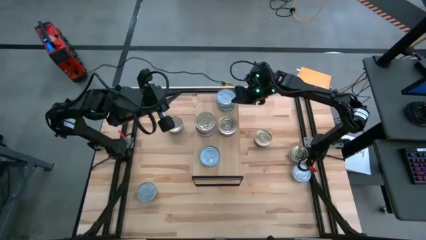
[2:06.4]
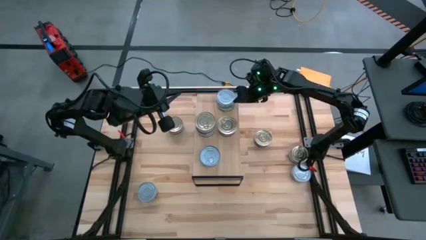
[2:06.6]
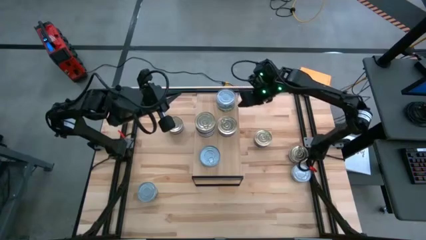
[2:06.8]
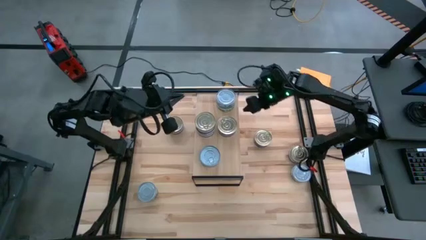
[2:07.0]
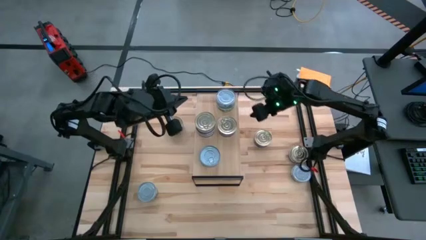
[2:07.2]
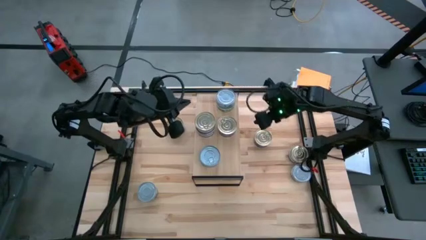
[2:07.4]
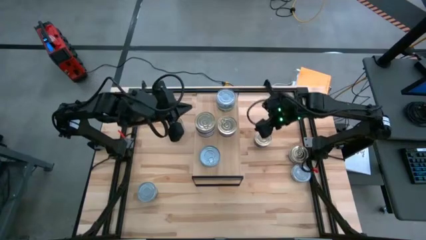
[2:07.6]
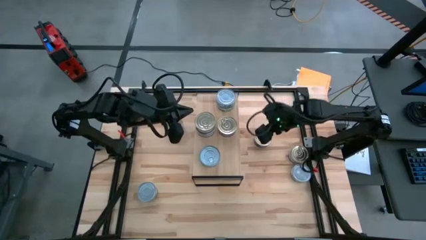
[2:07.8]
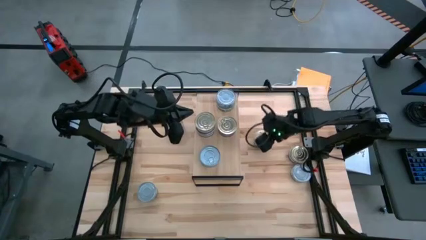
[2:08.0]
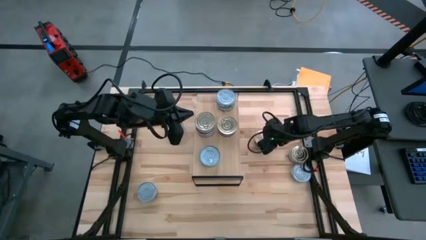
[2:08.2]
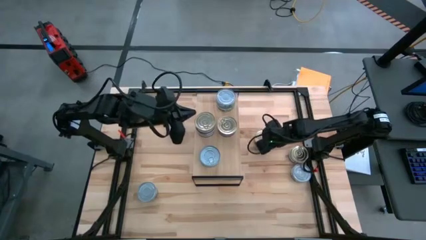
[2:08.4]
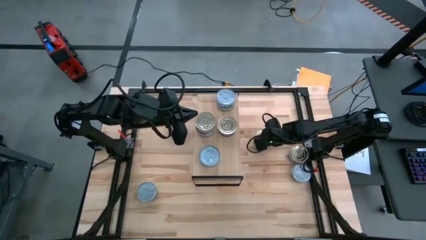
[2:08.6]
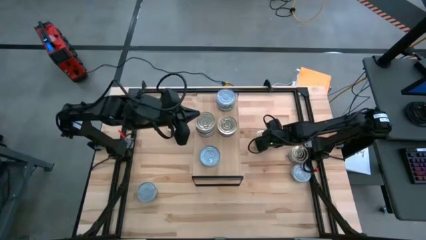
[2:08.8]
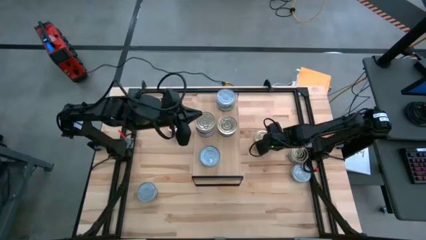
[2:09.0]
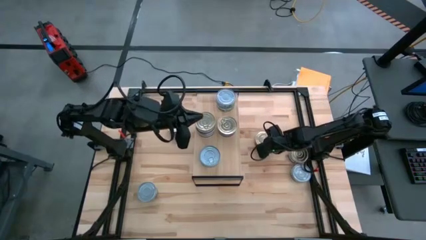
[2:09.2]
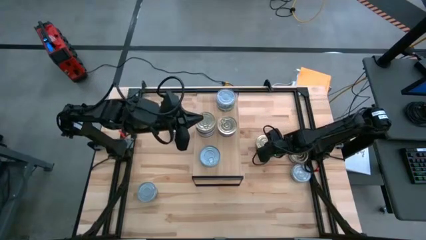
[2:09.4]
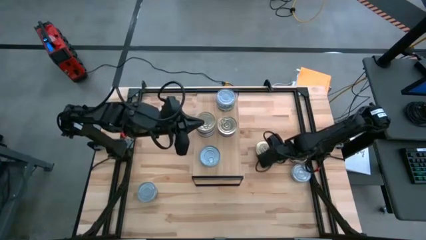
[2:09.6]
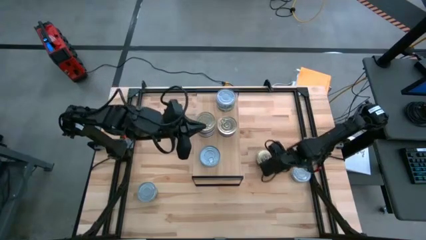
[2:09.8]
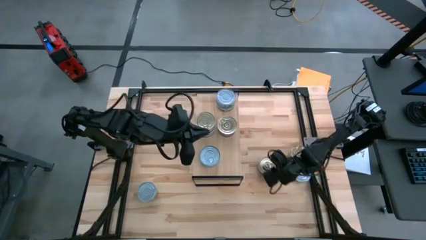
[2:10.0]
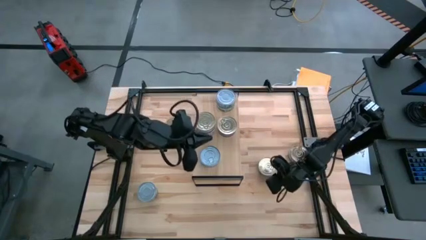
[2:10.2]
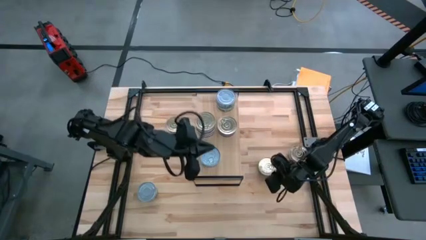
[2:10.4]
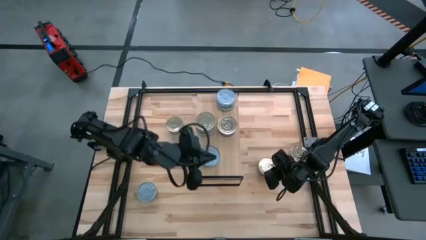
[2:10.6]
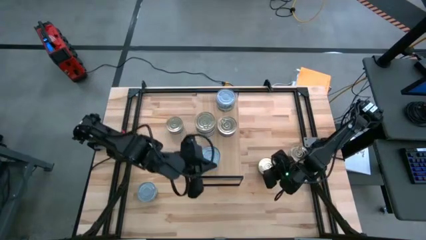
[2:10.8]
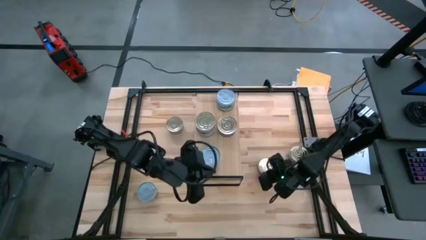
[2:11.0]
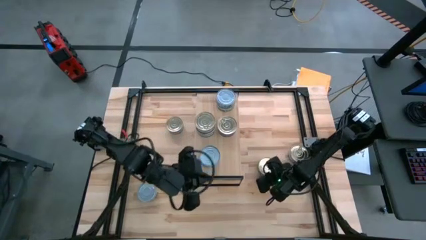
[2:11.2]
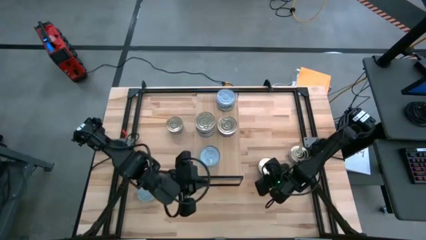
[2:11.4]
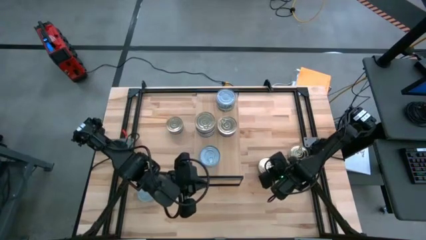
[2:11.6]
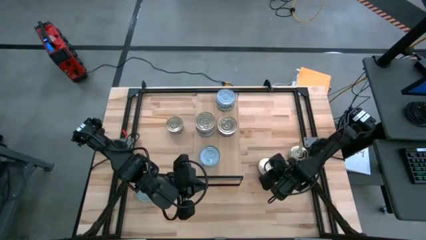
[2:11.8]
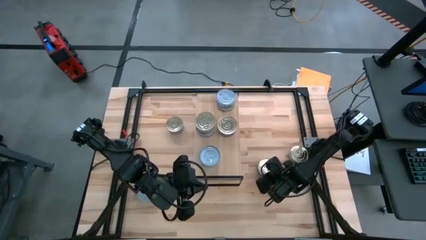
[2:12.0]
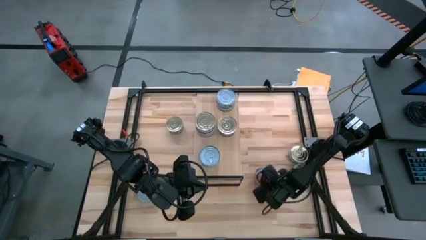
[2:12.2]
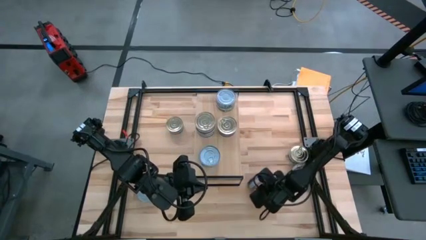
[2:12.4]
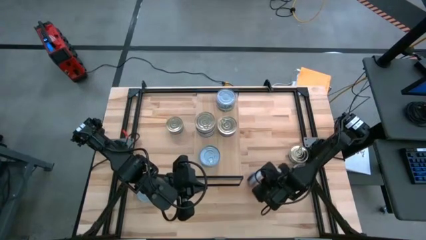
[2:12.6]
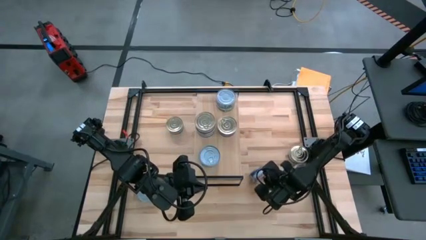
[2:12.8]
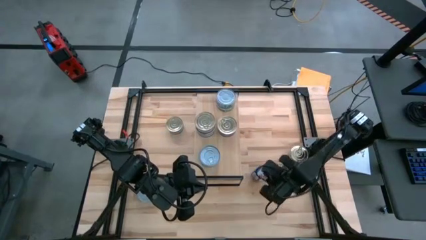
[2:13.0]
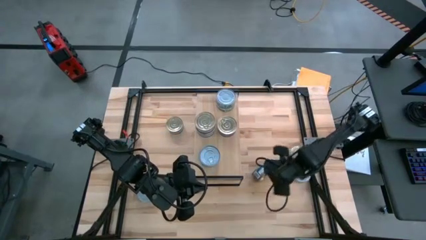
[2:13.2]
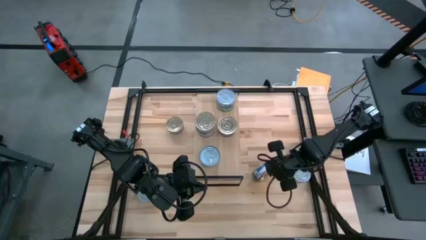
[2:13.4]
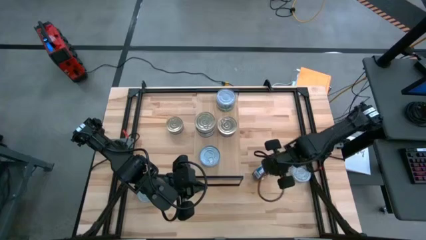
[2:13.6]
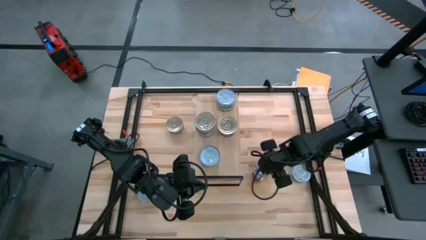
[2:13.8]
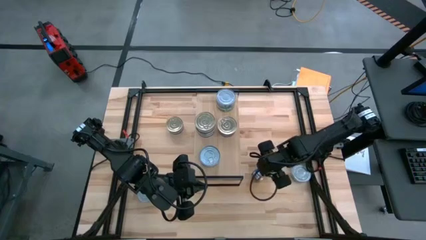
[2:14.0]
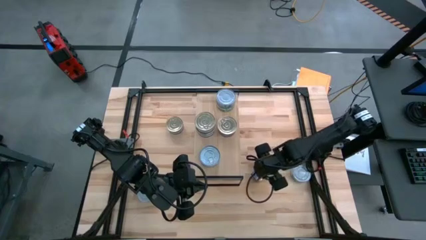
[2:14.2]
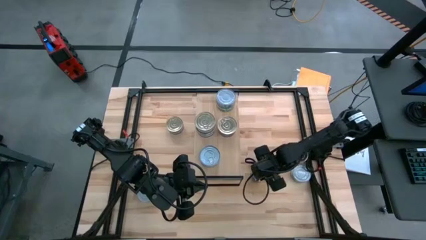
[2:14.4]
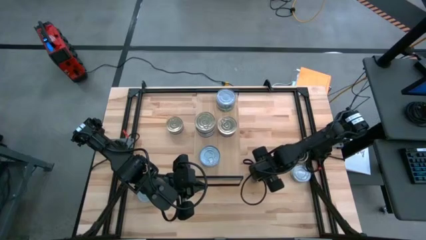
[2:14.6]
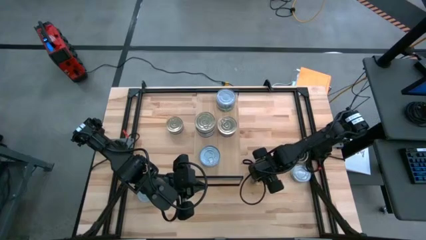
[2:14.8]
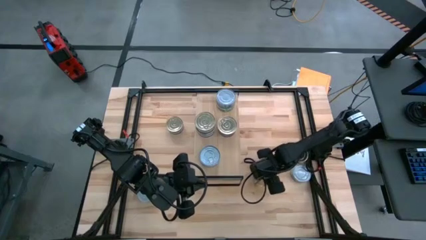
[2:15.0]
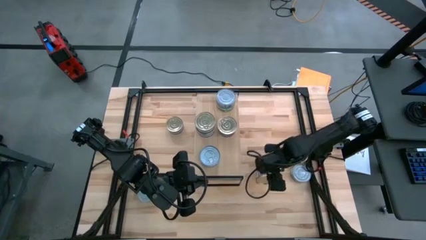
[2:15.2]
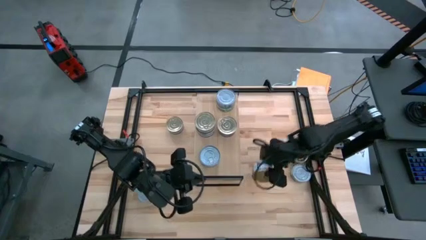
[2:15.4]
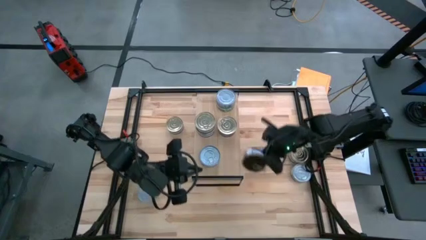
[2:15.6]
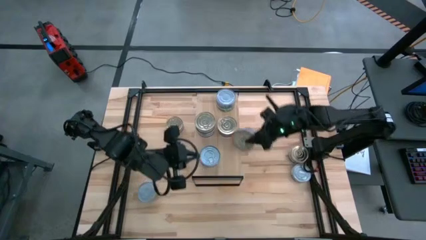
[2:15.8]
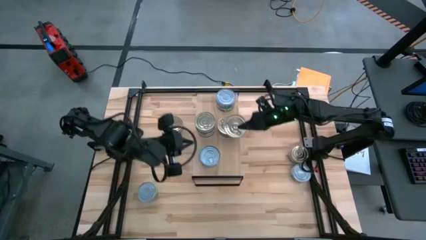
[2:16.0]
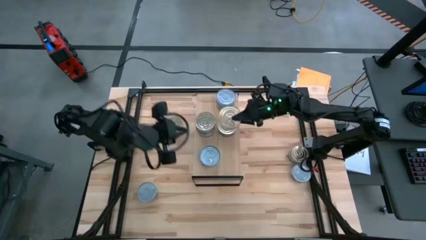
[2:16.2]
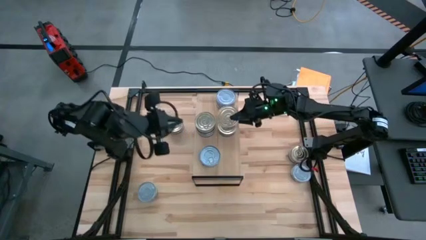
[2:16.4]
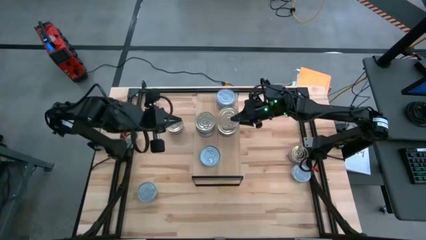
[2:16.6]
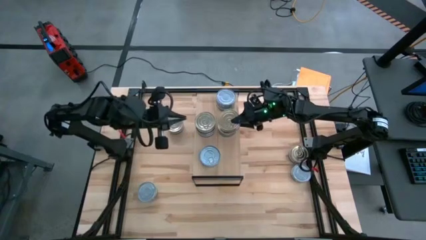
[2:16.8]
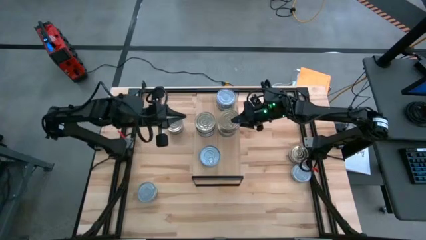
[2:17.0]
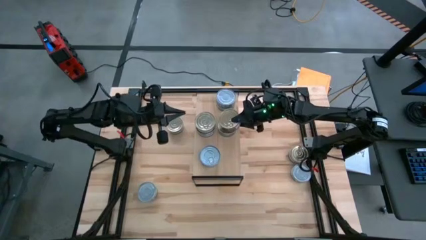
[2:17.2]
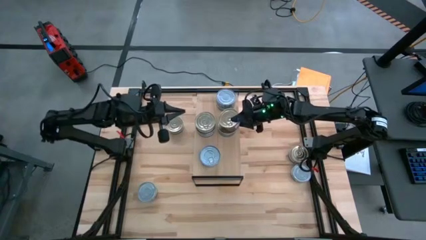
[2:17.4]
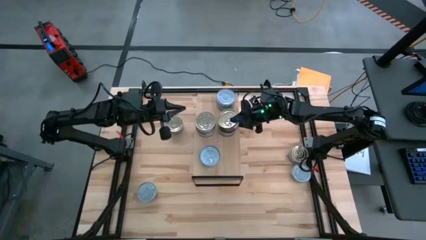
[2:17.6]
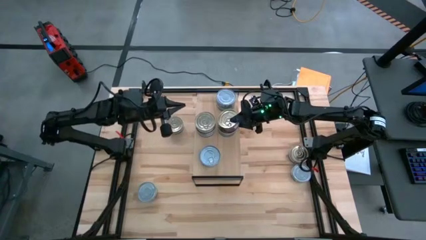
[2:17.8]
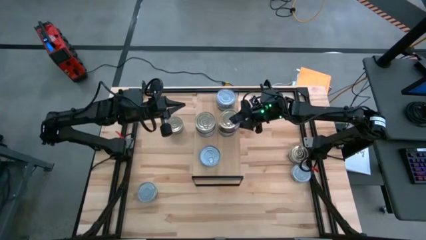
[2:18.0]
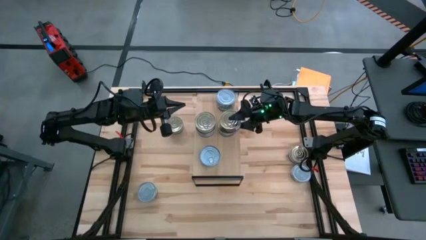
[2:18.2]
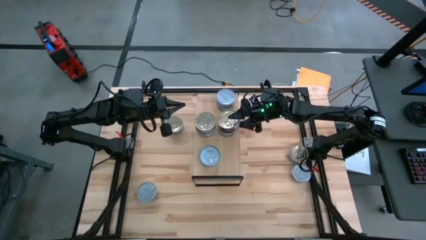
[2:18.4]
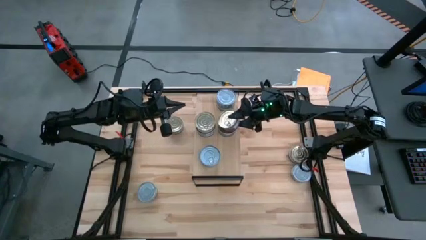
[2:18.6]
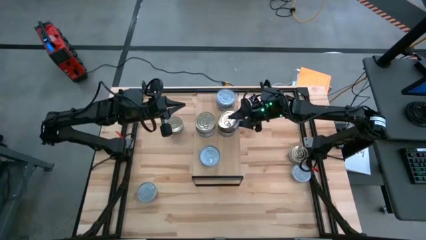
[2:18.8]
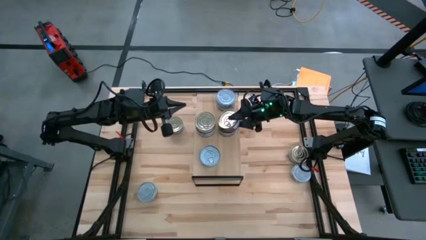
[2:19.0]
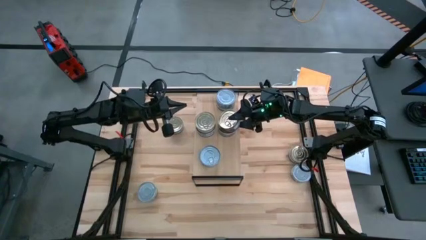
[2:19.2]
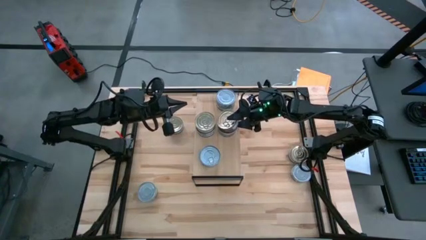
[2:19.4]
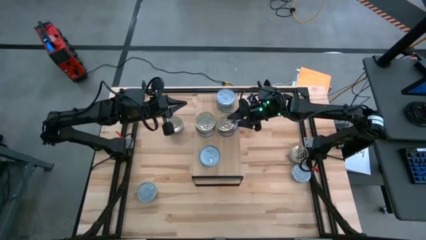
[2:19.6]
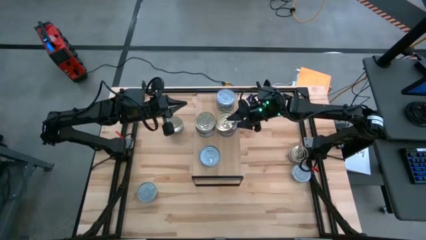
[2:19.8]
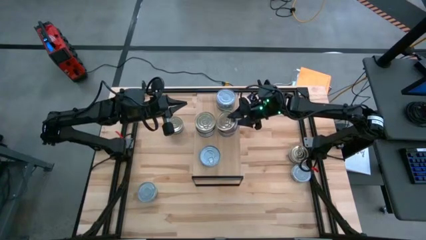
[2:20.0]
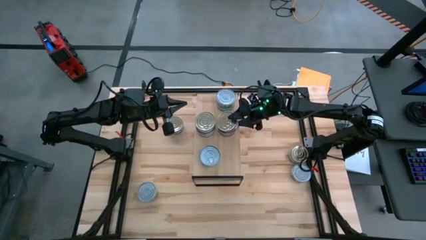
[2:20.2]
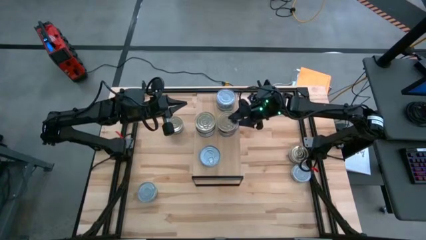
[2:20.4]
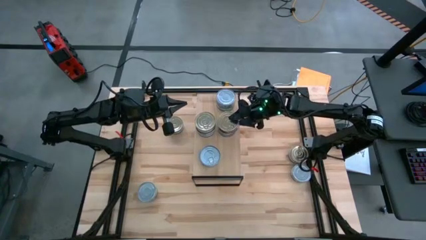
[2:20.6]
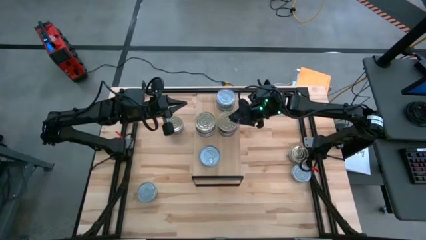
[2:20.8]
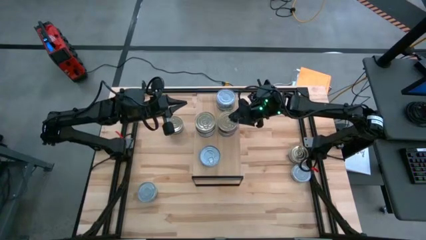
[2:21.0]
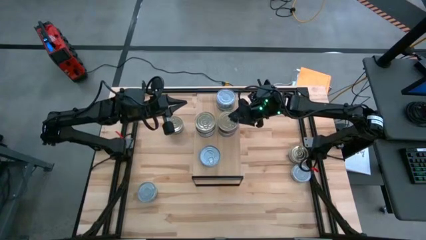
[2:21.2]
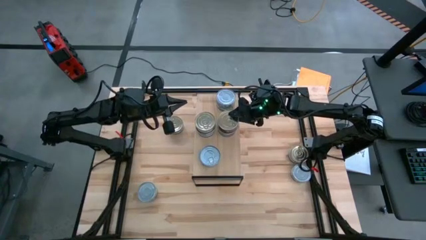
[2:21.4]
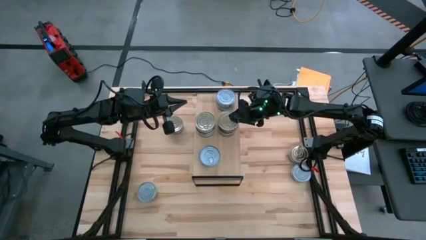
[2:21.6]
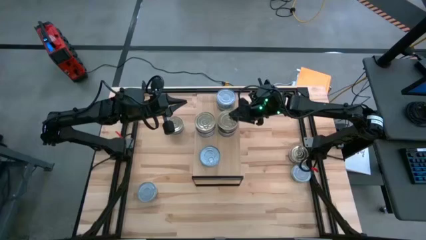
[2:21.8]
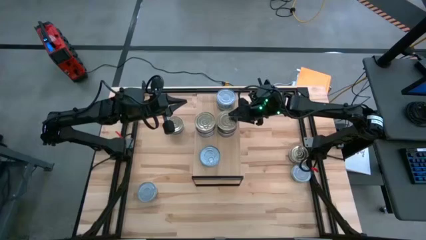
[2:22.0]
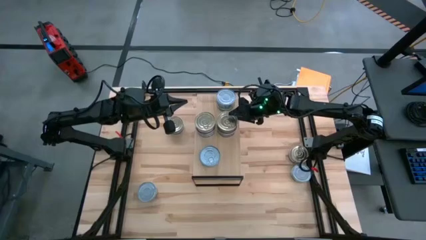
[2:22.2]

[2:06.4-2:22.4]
Task: Stack canned seafood by type on shelf
Stack the blue-pink tuna can on top of the blue-pink tuna can on the shelf aligned with the other blue-pink tuna can
